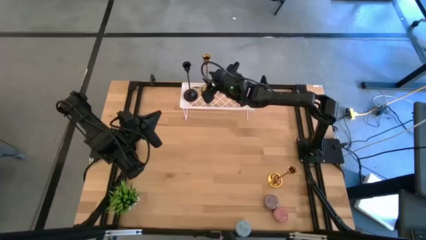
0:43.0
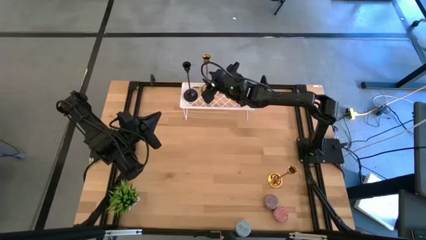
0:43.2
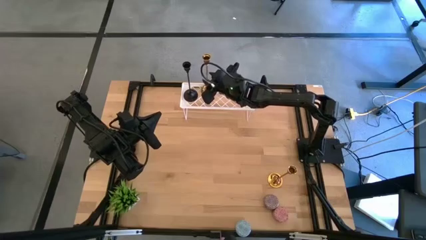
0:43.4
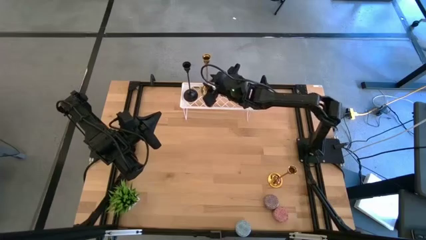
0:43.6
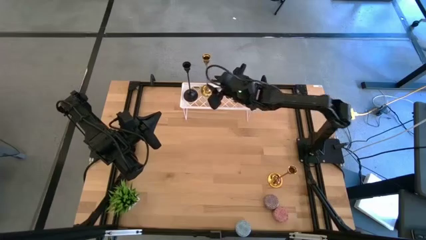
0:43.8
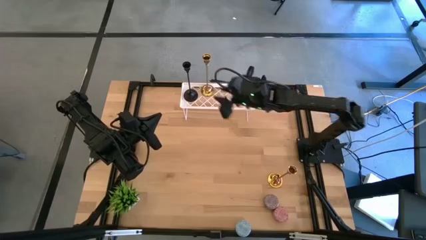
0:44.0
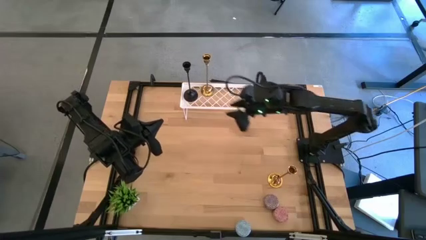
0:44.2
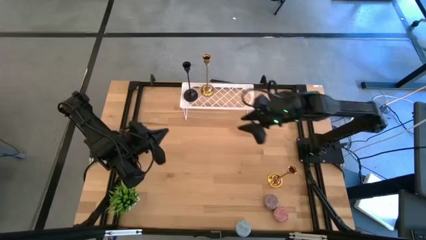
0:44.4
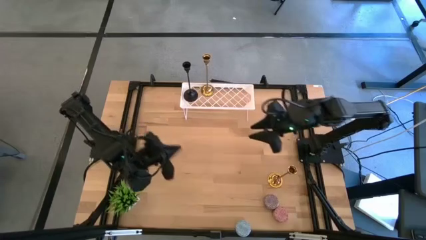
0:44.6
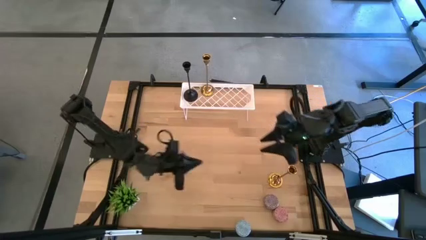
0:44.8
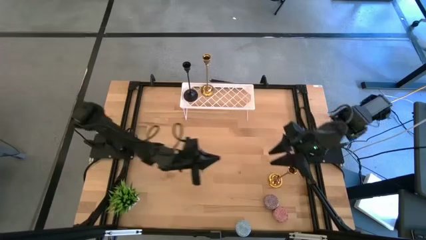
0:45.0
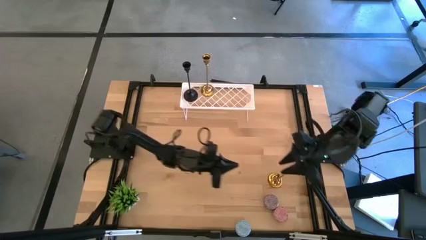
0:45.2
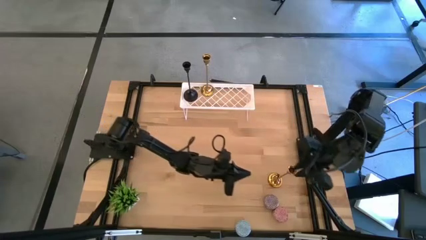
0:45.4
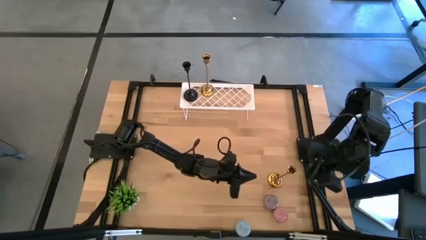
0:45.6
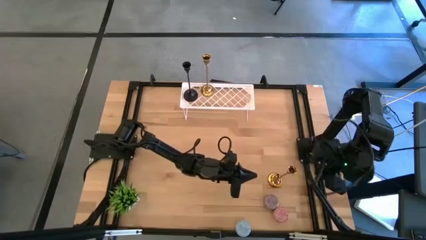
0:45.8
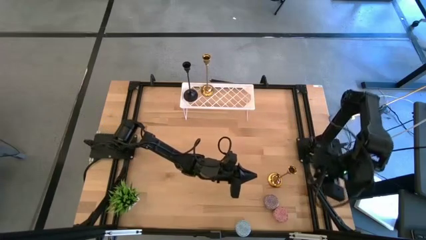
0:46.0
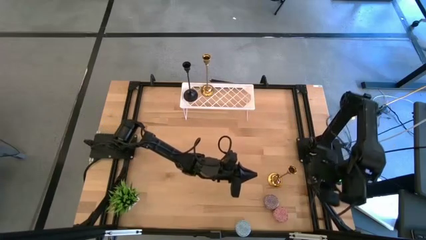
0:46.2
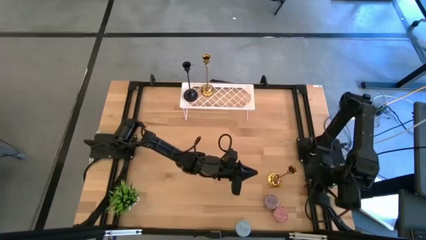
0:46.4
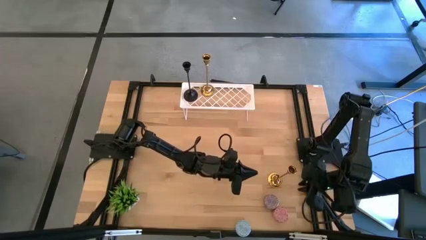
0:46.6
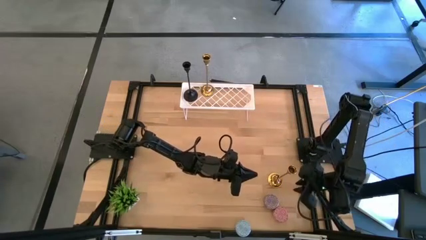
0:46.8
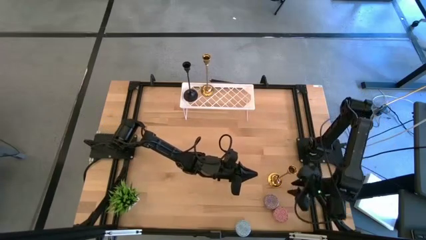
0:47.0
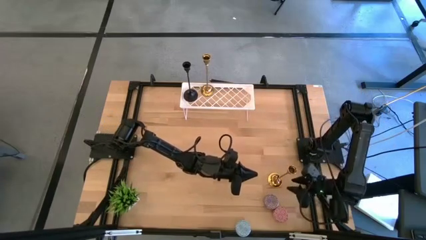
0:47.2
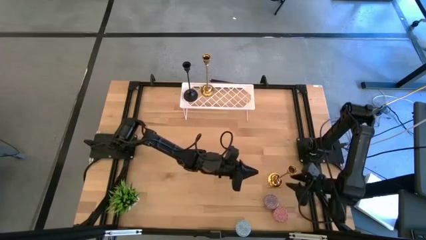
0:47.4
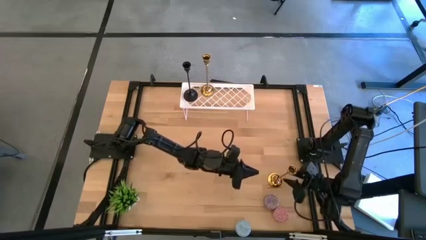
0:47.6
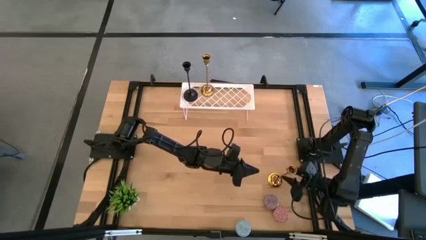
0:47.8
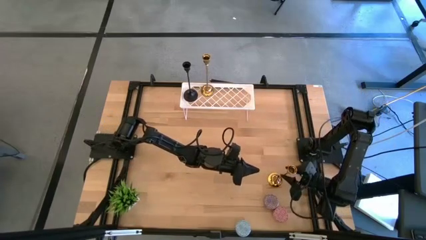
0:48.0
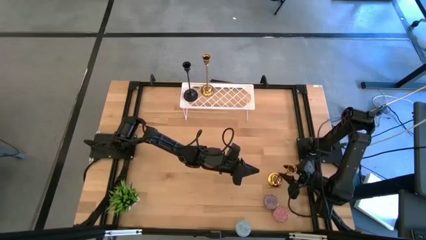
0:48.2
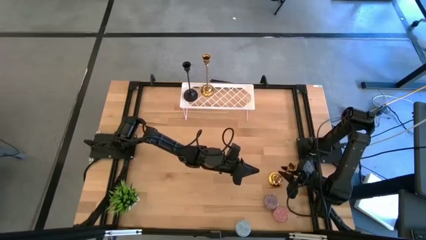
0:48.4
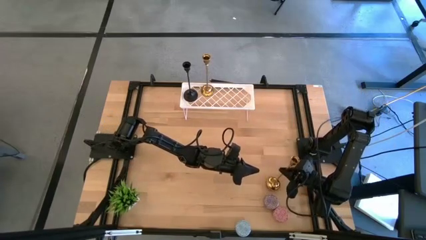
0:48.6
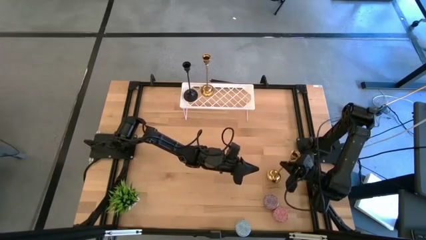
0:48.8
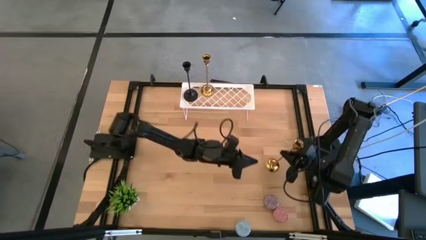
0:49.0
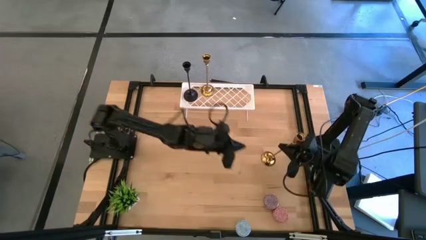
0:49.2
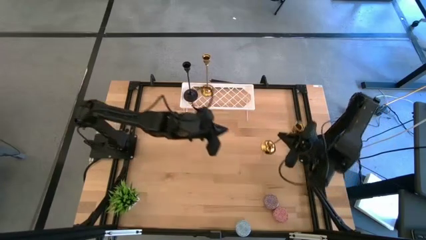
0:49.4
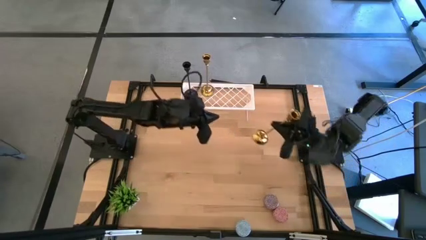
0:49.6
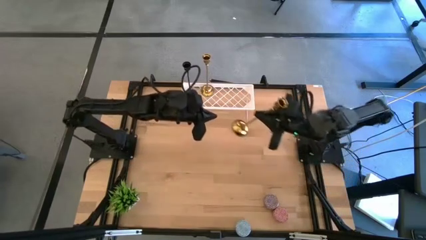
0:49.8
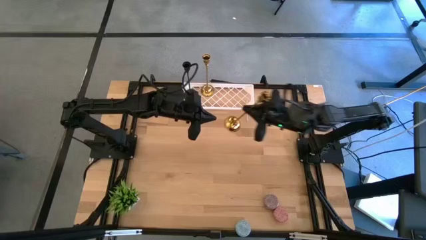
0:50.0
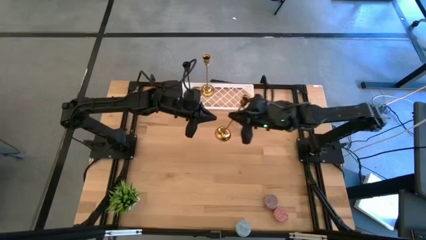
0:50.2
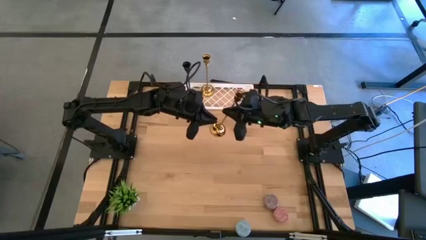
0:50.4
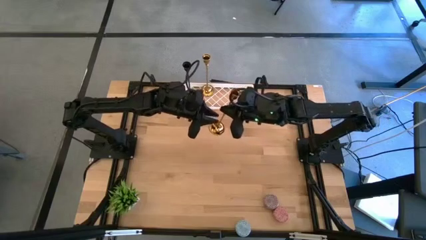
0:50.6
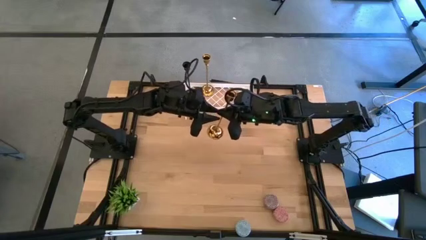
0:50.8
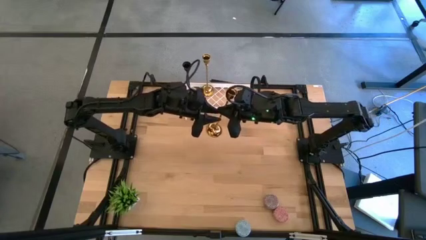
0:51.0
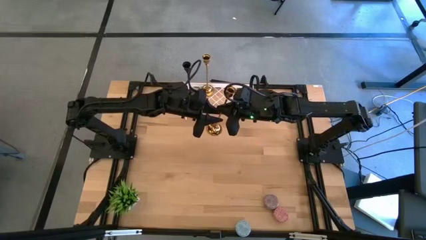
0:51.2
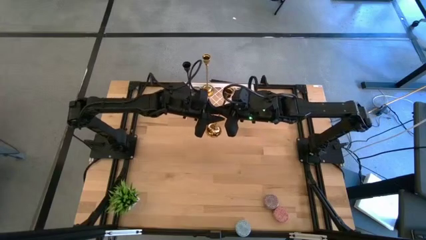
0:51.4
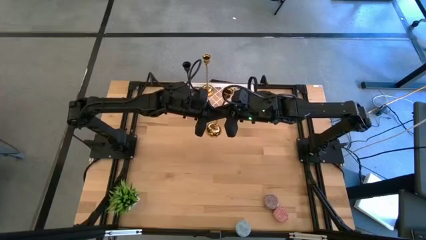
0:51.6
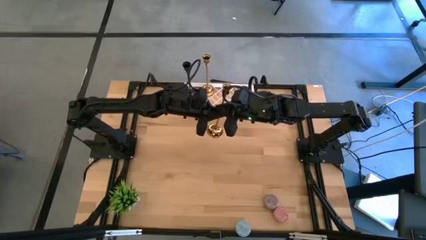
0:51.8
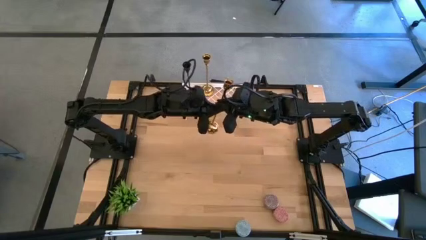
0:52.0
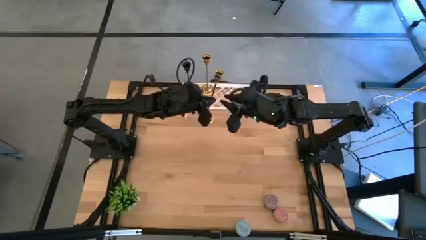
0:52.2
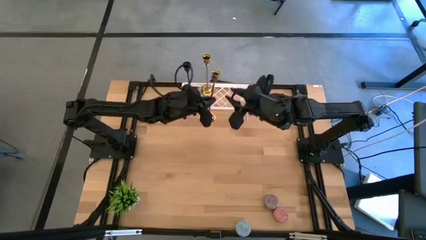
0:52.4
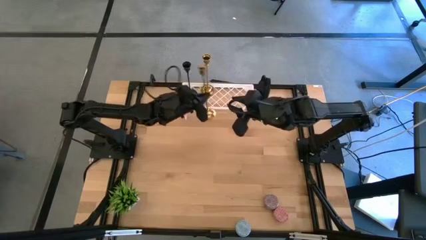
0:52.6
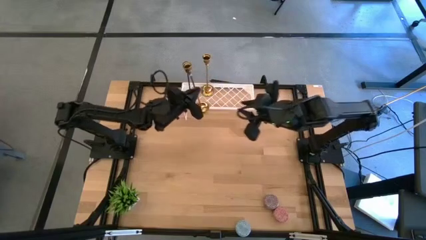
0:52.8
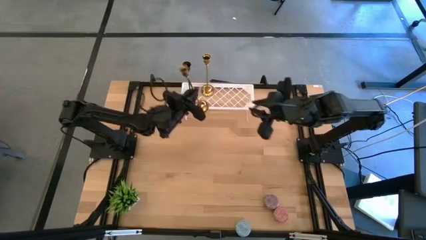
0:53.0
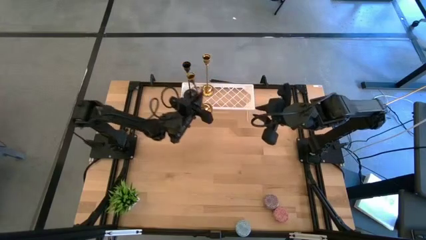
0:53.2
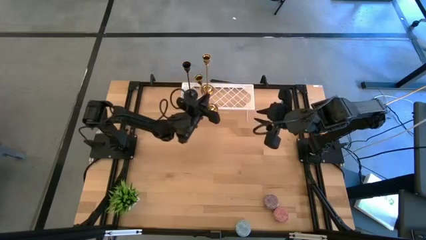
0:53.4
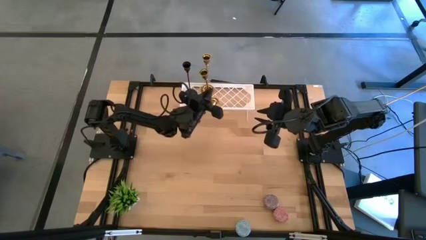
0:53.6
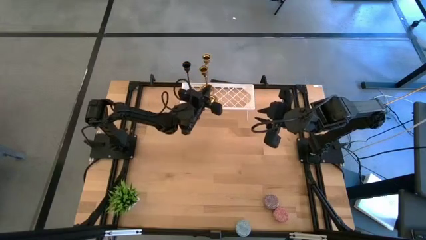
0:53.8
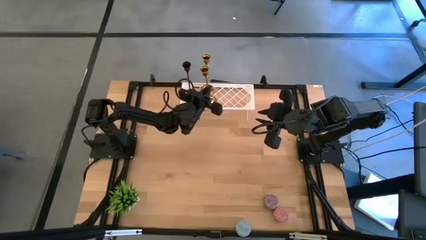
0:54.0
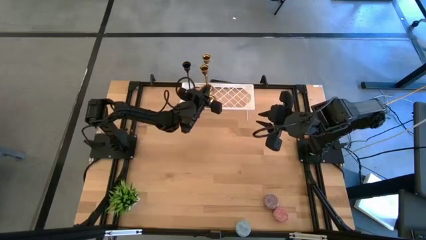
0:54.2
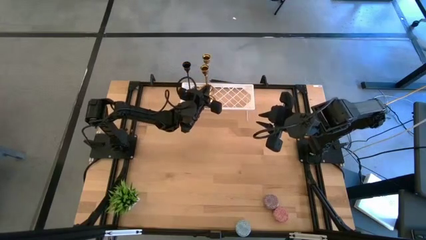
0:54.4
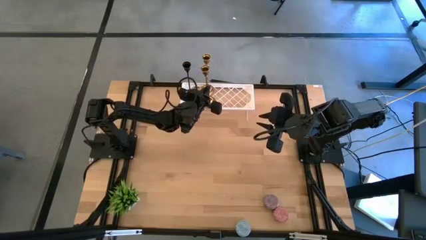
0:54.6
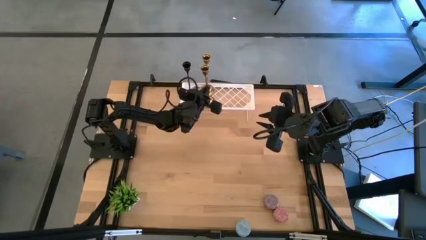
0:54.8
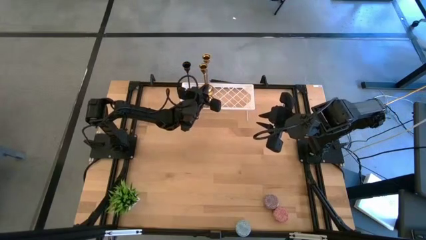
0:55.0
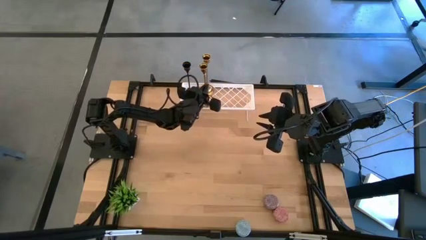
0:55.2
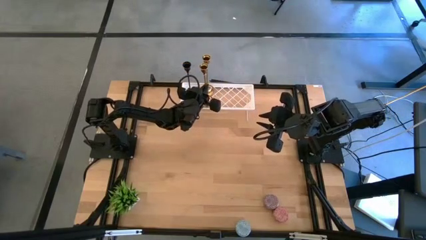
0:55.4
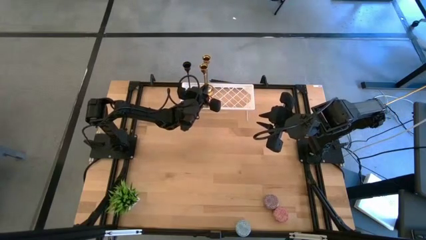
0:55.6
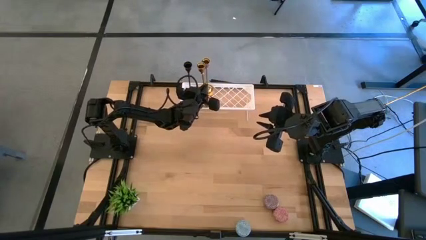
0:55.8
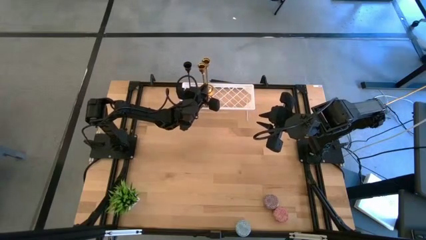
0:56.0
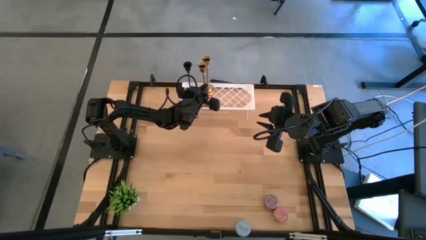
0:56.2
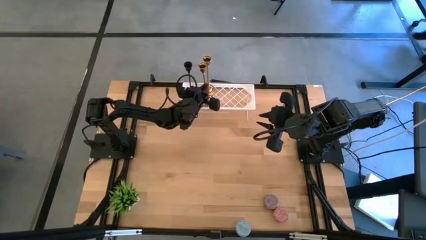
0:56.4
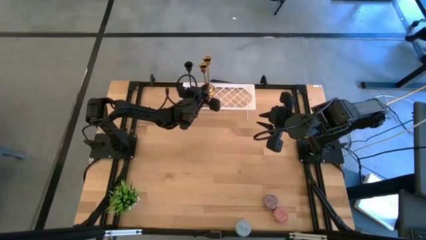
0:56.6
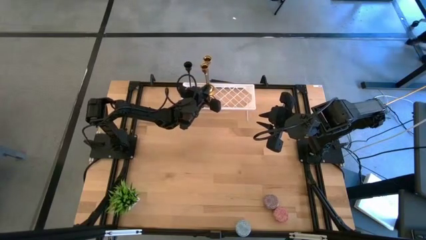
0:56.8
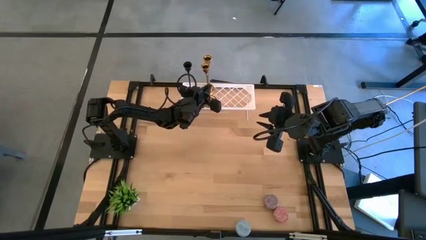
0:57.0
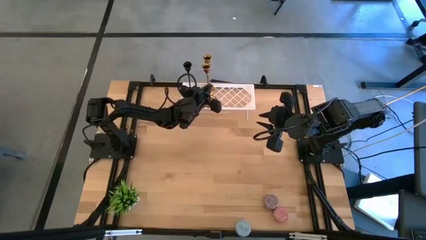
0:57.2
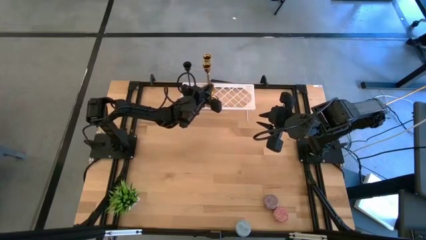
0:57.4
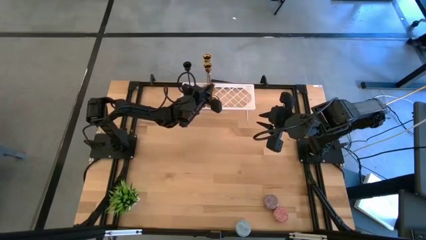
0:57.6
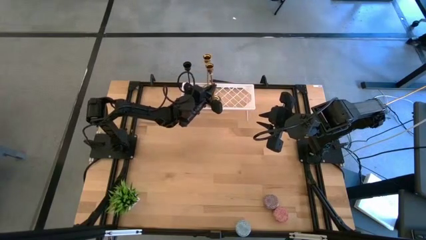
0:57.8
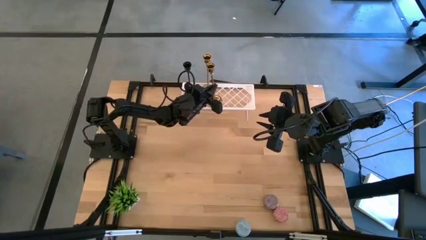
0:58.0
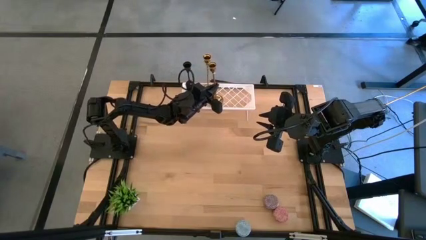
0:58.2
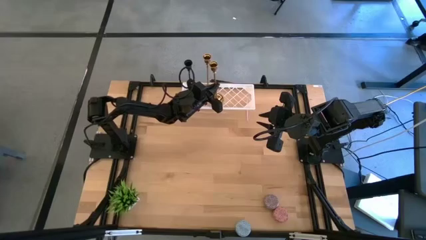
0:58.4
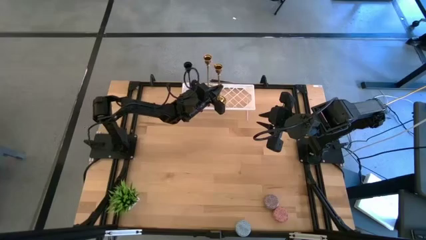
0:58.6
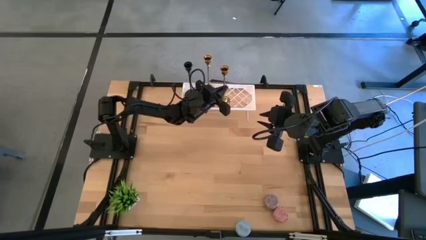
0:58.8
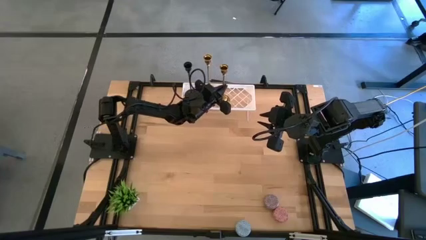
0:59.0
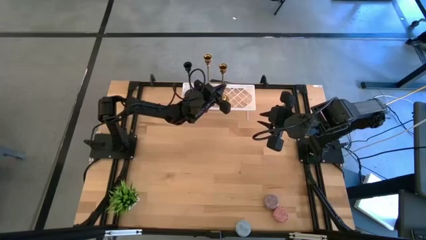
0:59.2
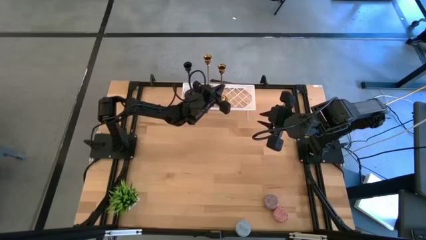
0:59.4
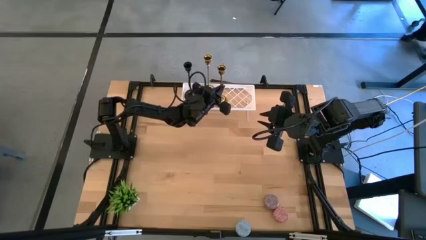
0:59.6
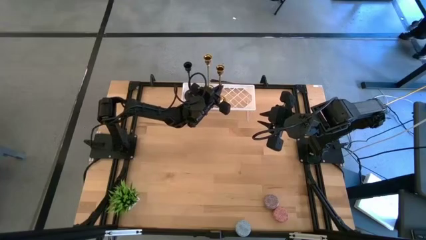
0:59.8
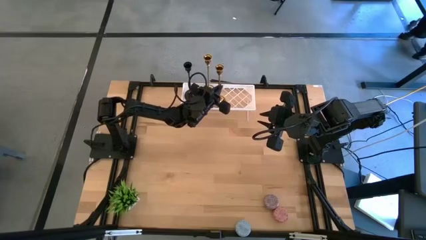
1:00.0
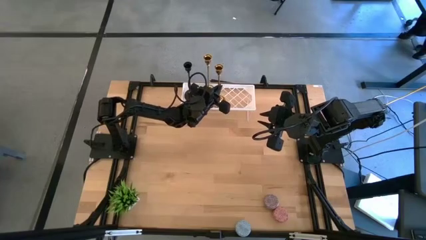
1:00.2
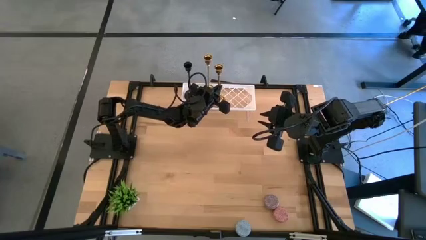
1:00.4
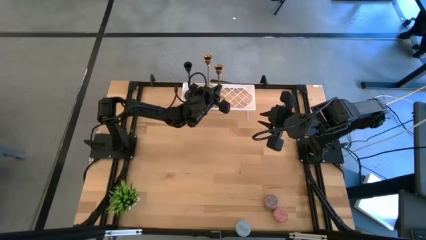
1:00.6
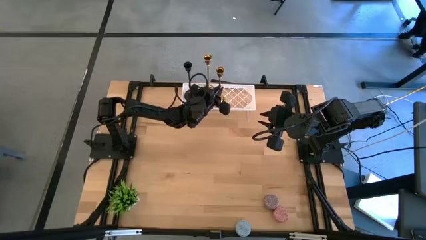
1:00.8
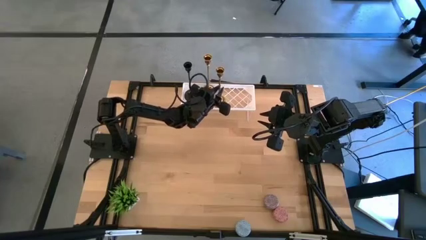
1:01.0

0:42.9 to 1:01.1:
Task: Pick & Place candle stick holders
Put the gold candle holder on the shelf
